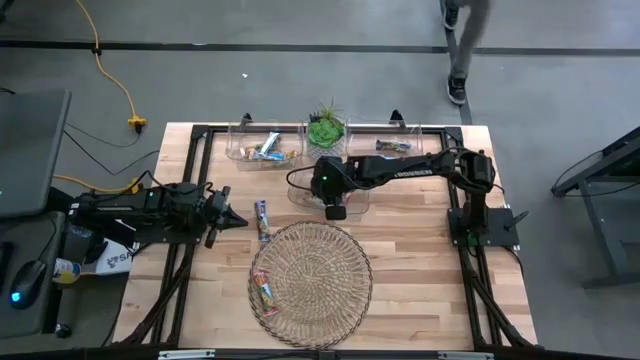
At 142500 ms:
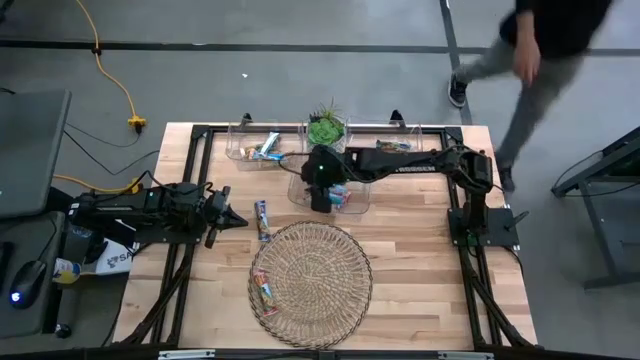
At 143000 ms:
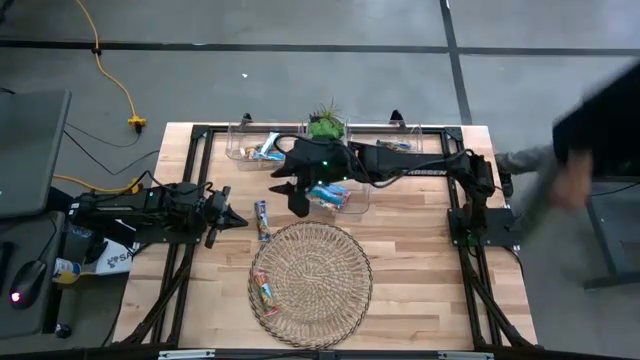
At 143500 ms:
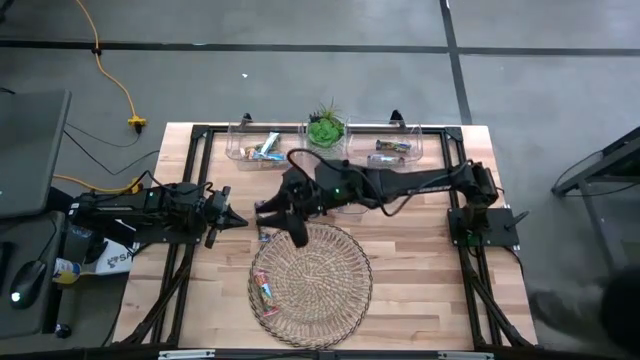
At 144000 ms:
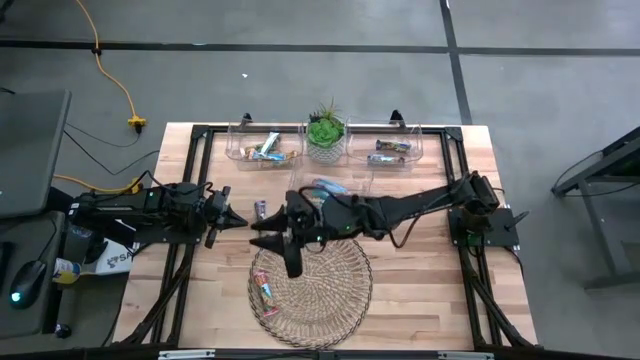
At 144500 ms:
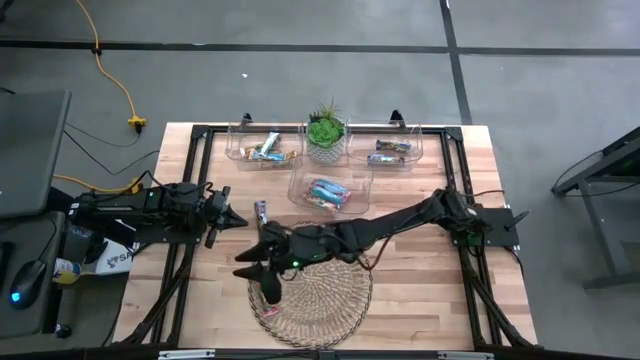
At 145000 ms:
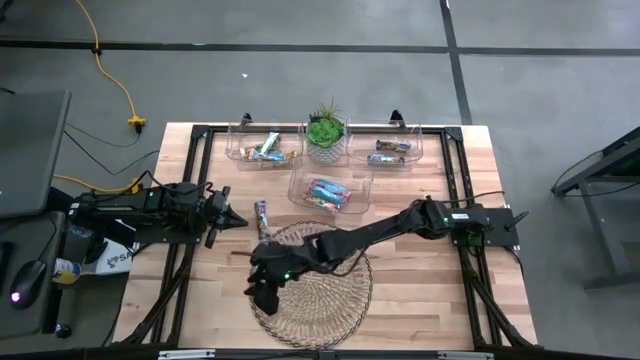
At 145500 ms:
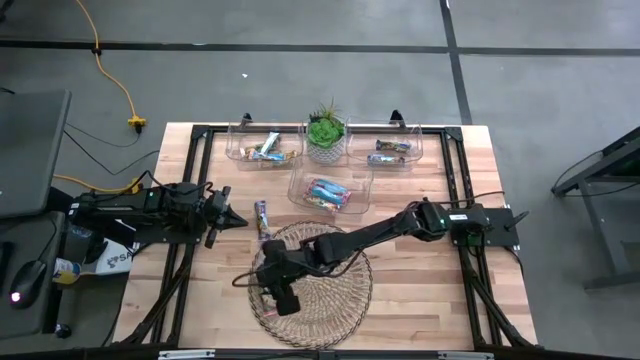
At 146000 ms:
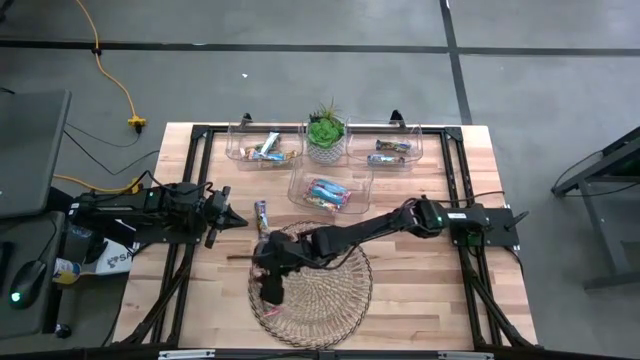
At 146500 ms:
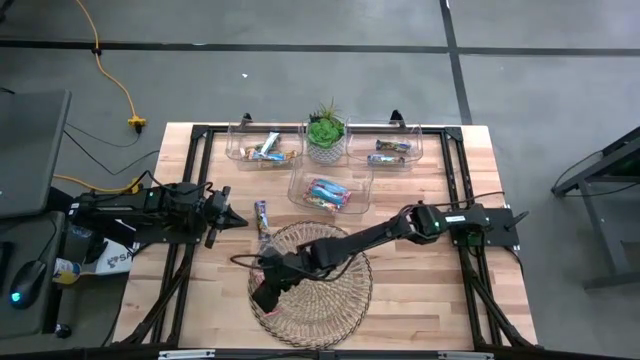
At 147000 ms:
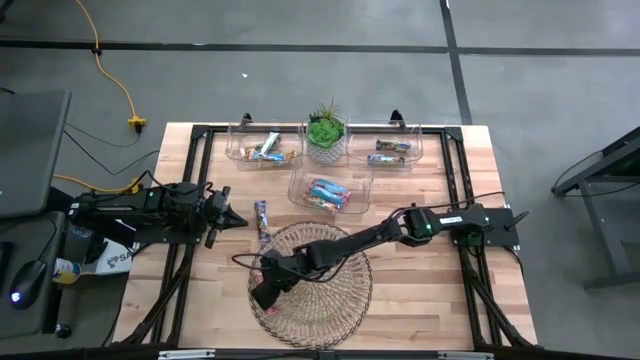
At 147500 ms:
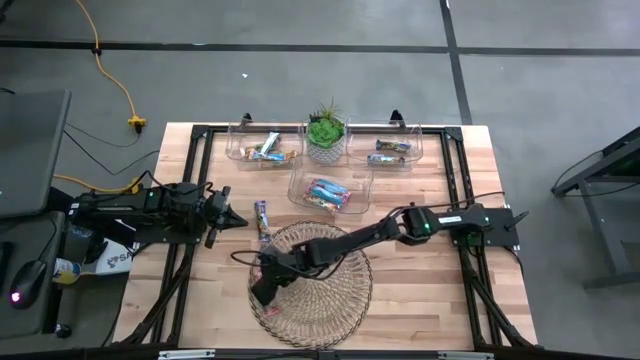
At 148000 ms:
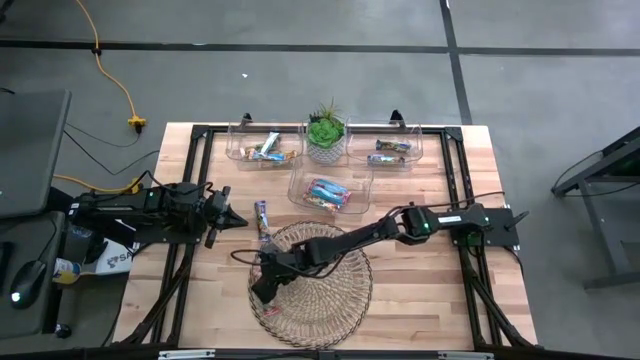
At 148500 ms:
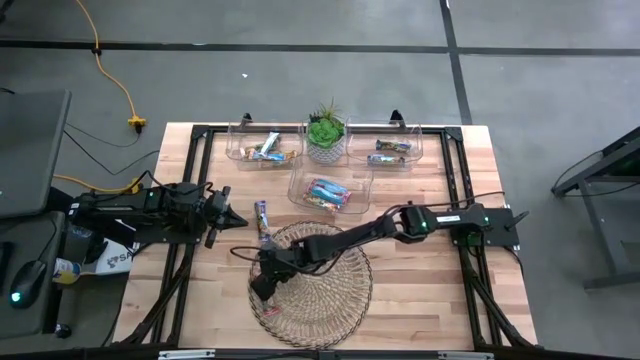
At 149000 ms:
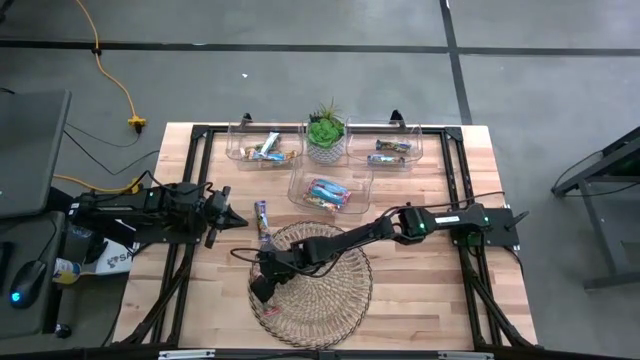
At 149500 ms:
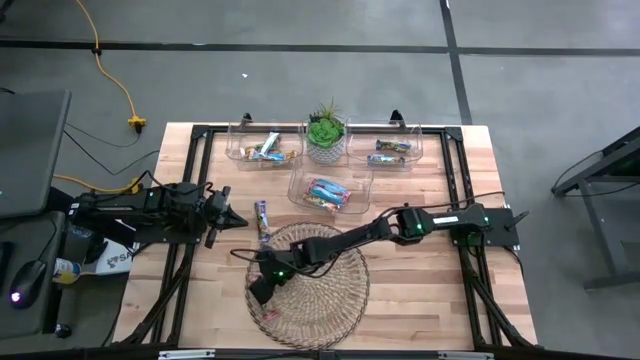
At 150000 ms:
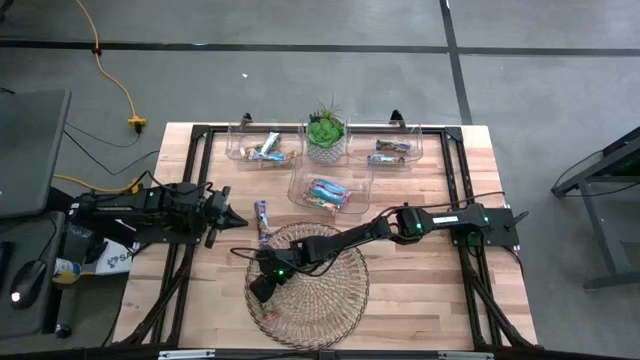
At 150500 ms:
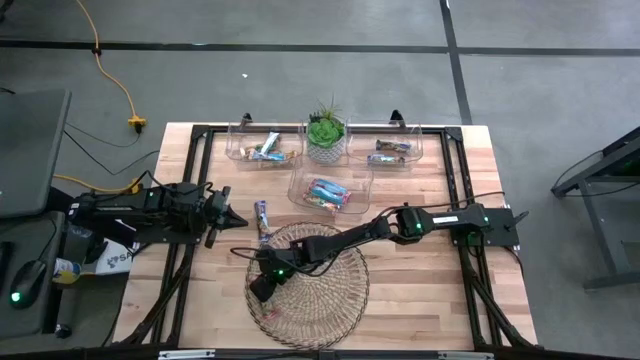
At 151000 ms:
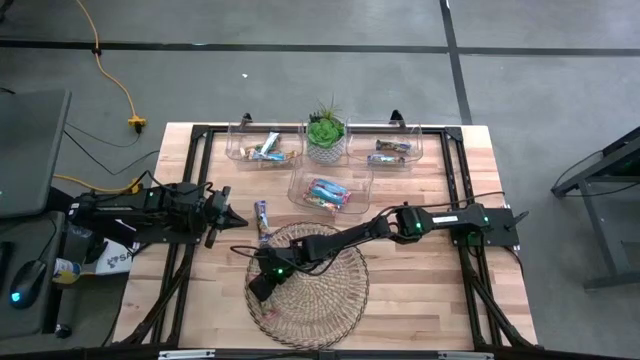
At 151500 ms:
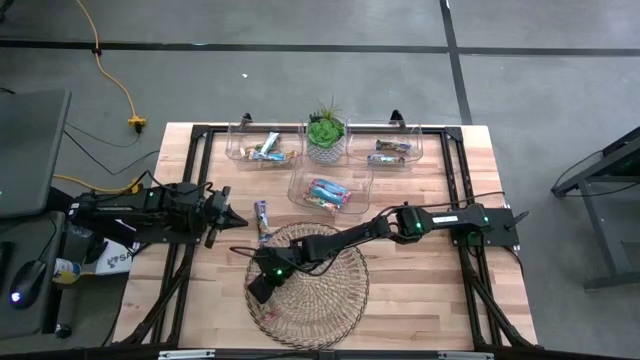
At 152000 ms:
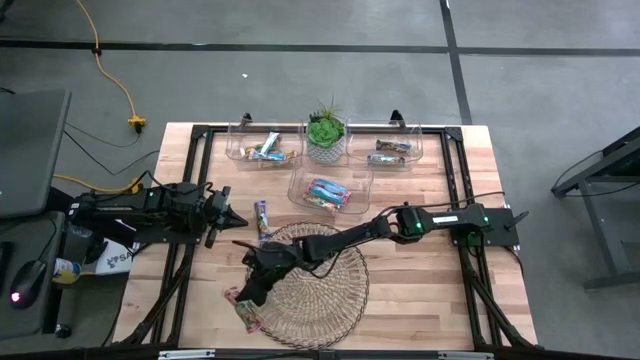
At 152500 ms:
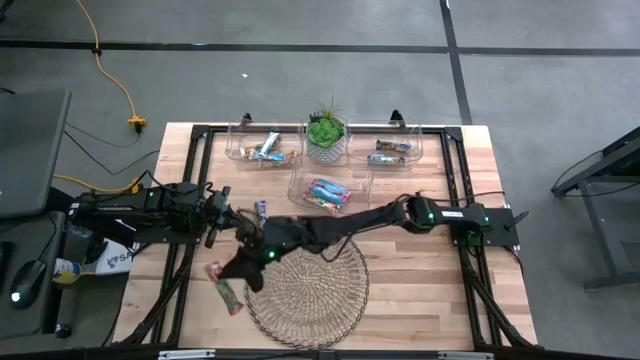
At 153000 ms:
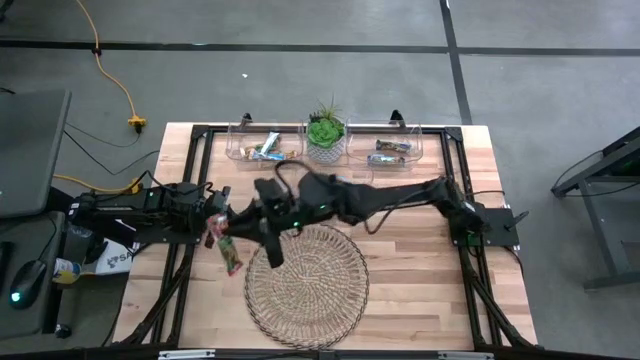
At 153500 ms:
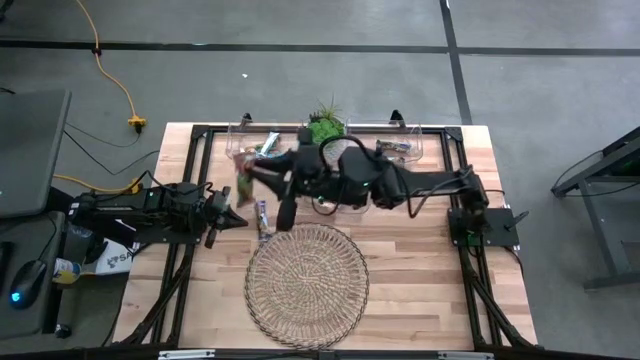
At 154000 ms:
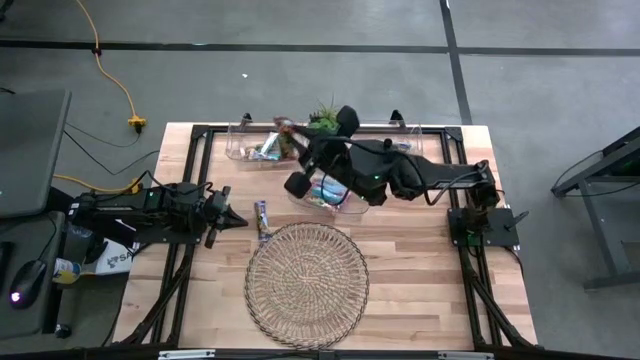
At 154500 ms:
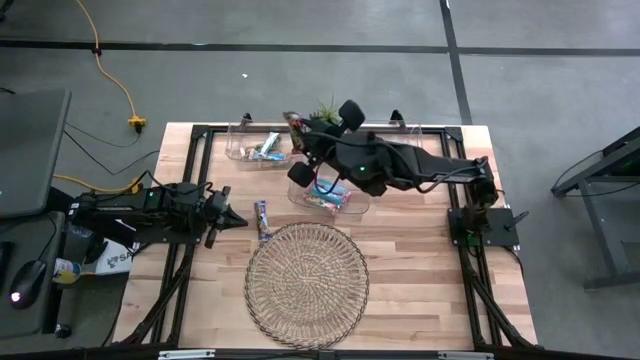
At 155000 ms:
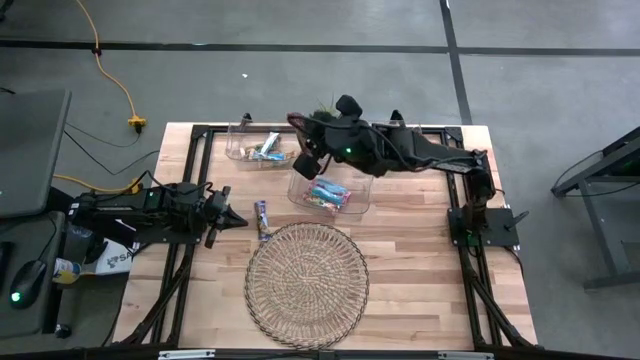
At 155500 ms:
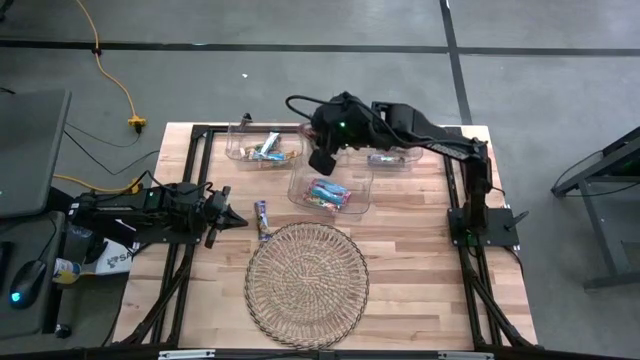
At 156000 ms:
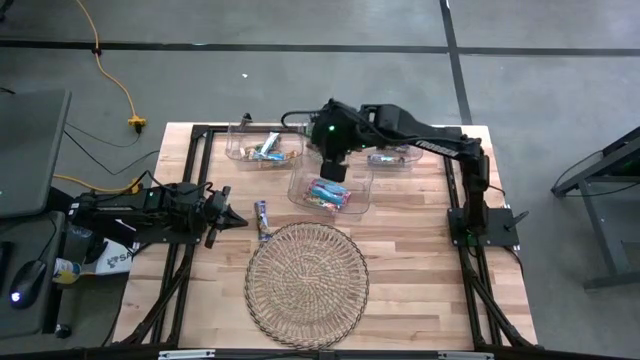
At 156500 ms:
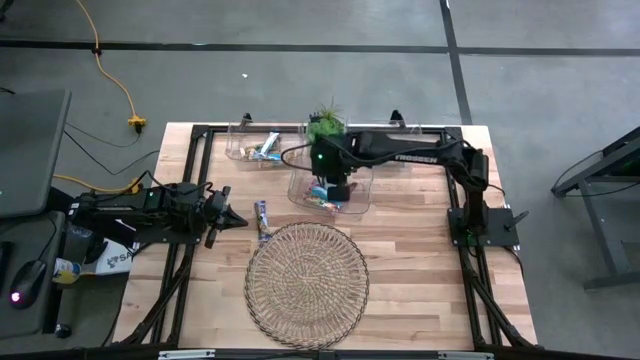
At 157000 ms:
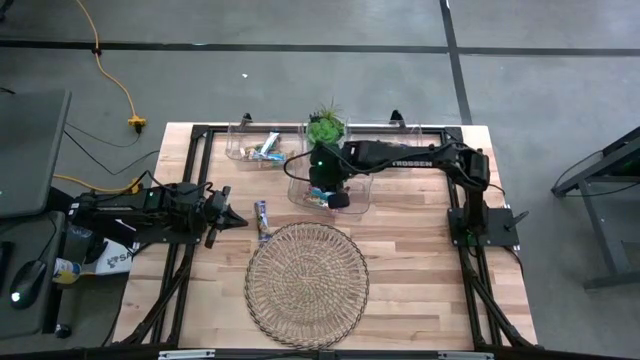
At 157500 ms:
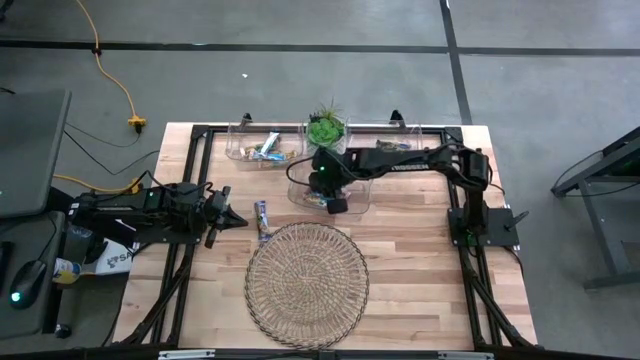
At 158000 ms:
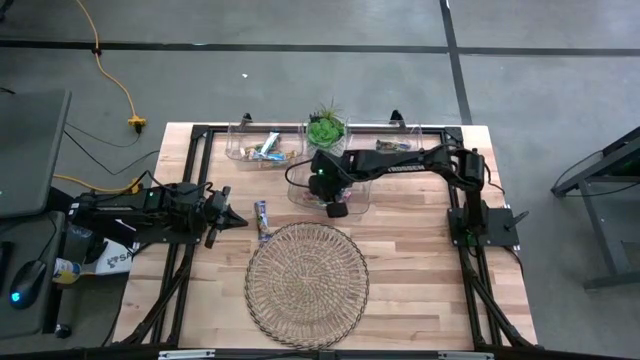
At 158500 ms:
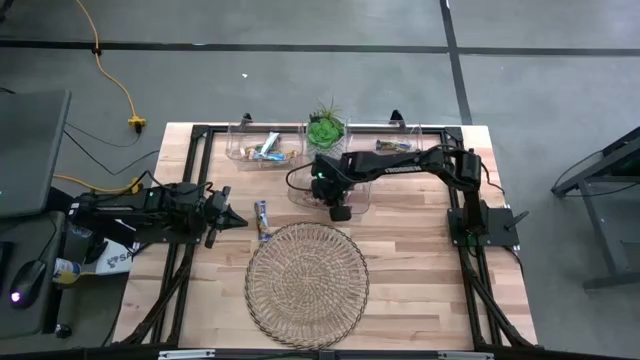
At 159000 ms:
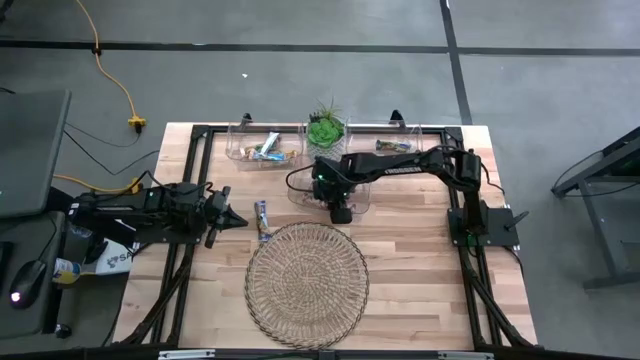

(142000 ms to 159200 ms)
Task: Pick and place Granola Bars by type
Put the red granola bar into the bottom transparent bin

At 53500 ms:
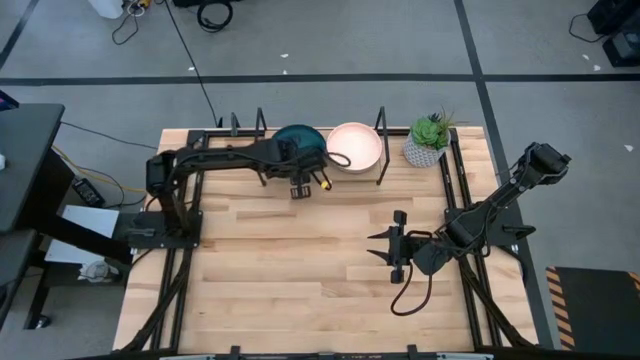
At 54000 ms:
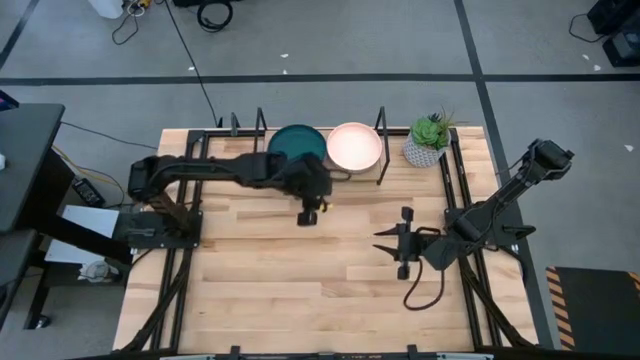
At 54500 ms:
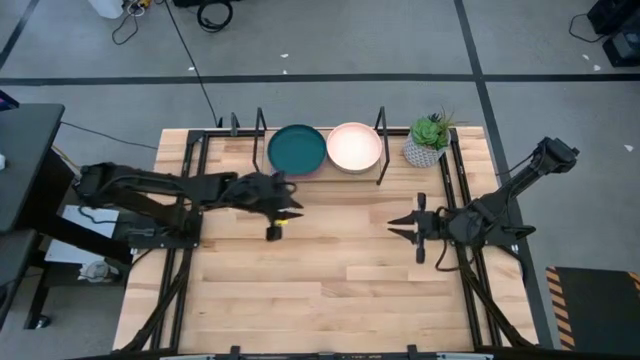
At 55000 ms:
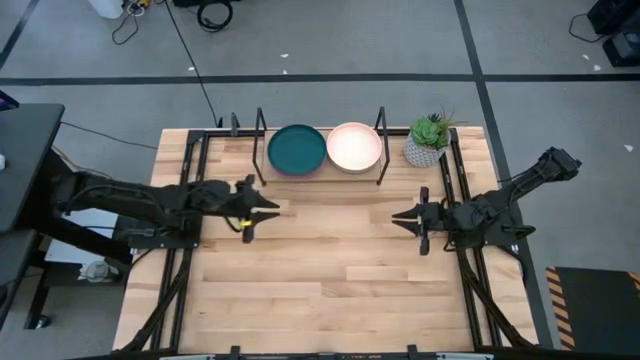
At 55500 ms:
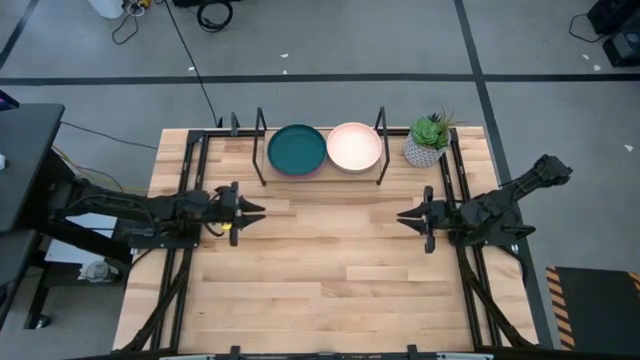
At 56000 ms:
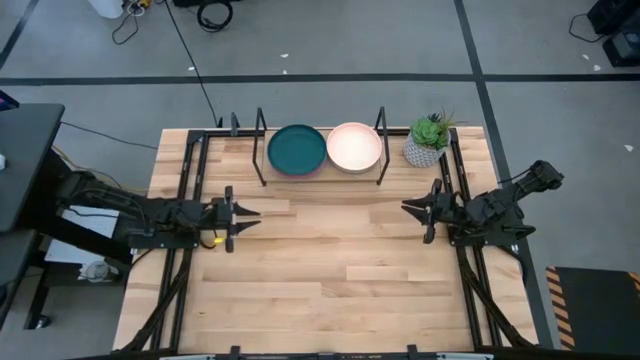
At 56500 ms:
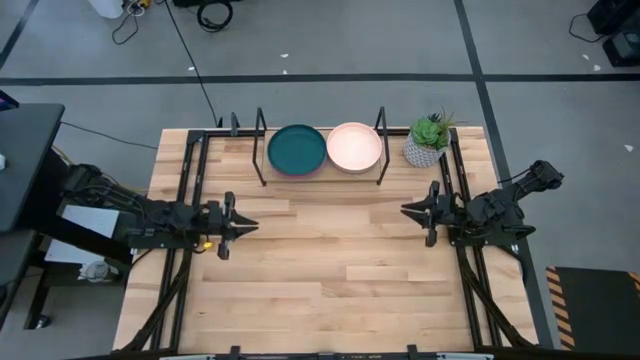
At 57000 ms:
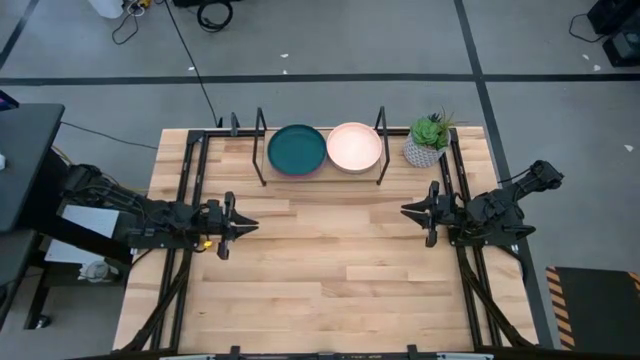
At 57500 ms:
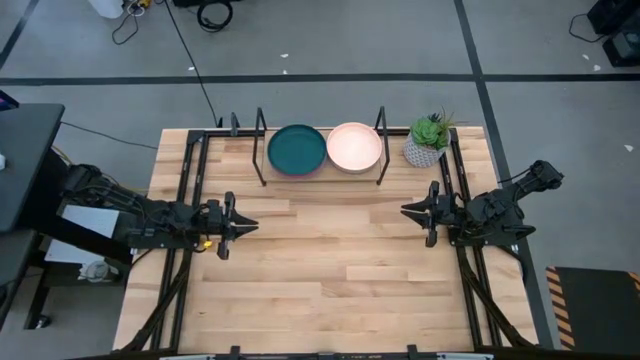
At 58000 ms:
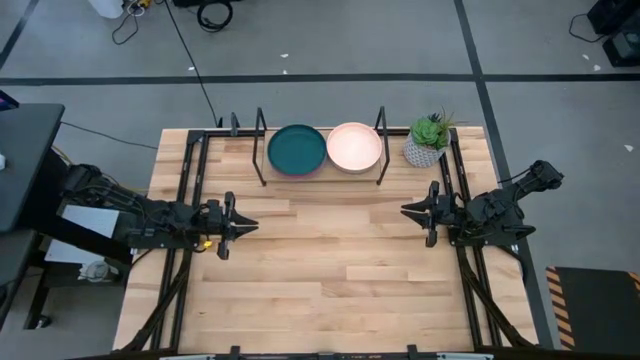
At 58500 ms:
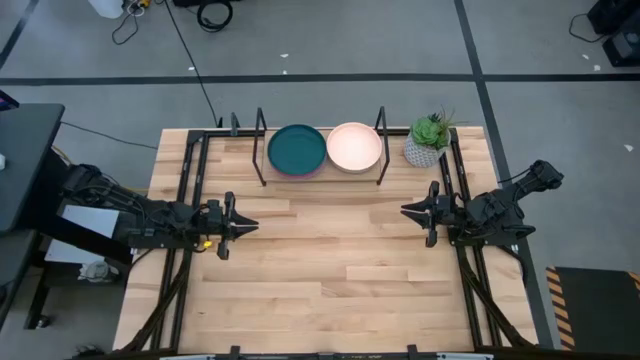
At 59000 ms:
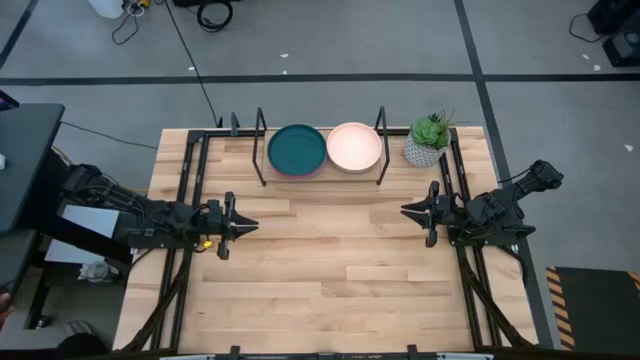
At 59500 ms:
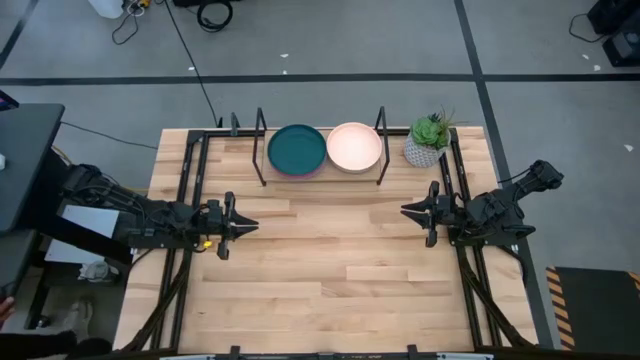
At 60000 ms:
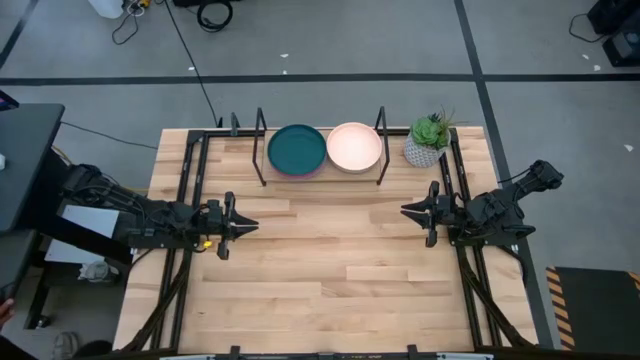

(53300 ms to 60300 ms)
Task: Place and stack plates onto a shelf
Return to Home Position
